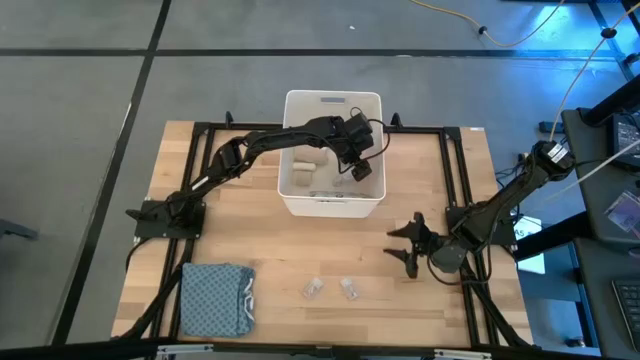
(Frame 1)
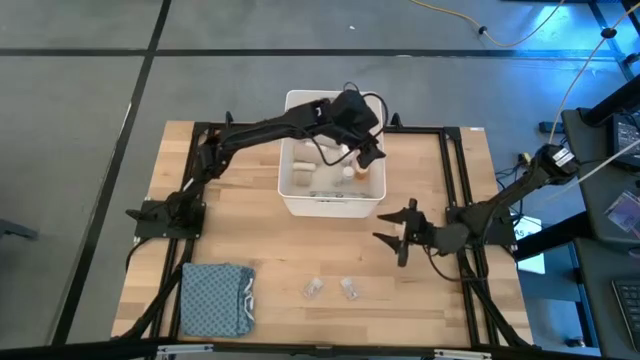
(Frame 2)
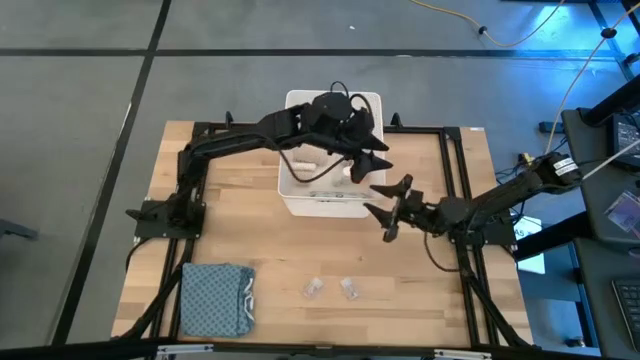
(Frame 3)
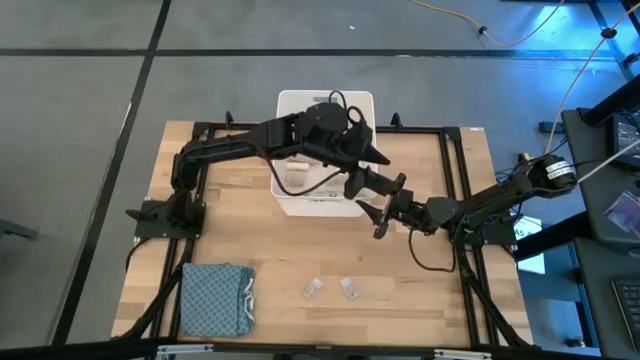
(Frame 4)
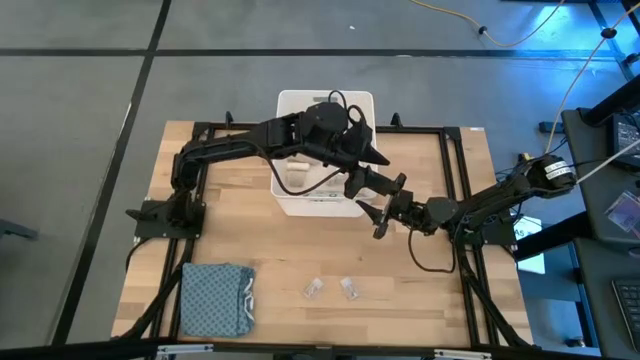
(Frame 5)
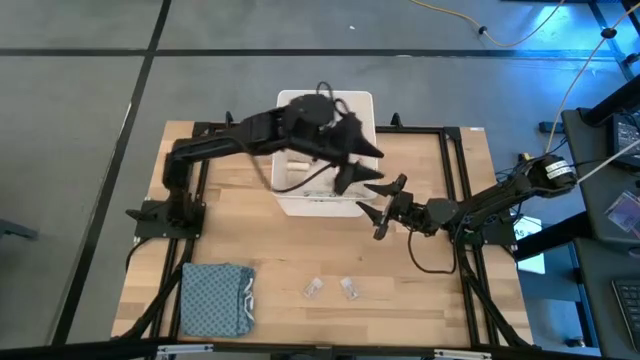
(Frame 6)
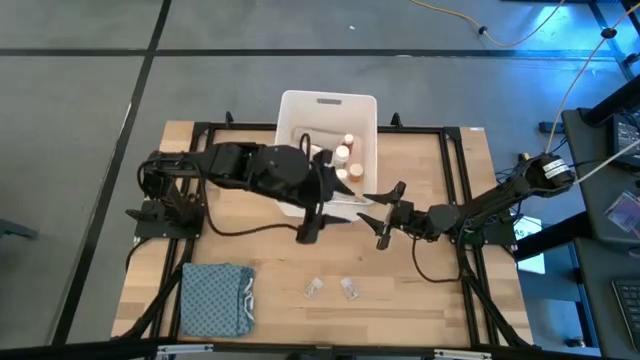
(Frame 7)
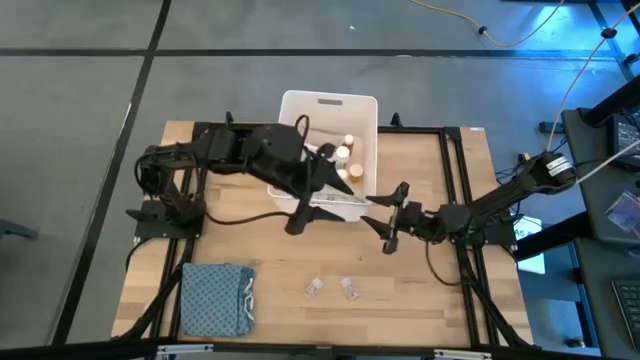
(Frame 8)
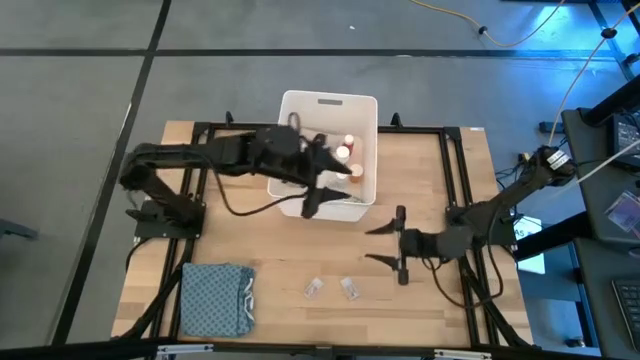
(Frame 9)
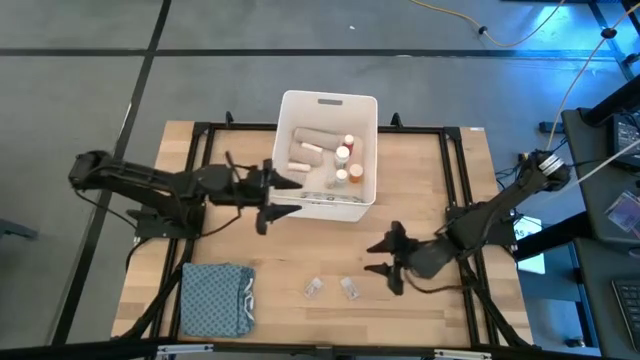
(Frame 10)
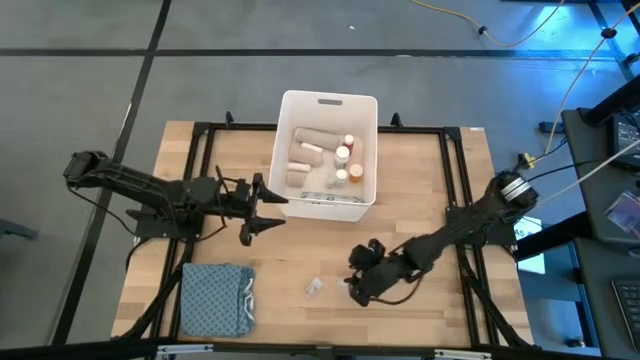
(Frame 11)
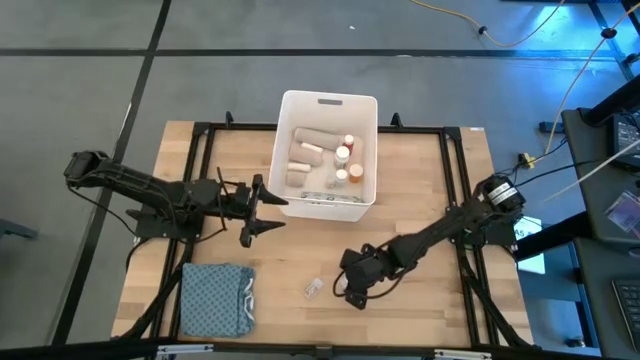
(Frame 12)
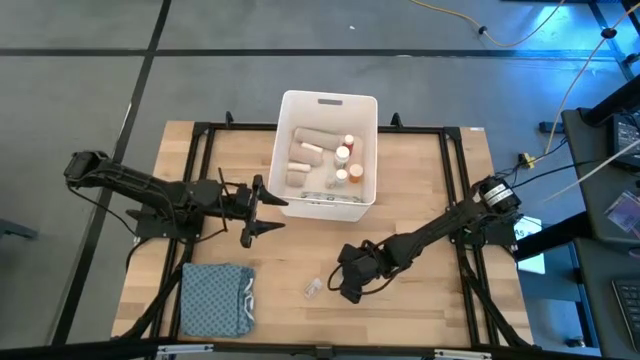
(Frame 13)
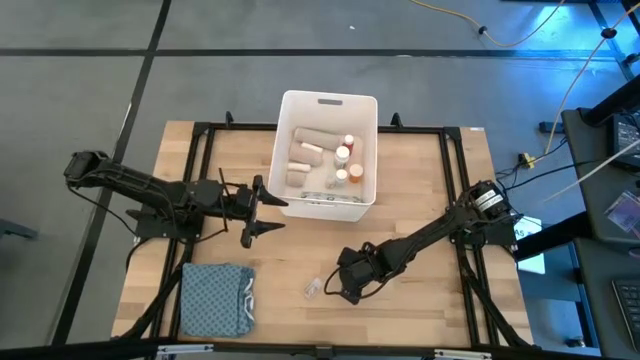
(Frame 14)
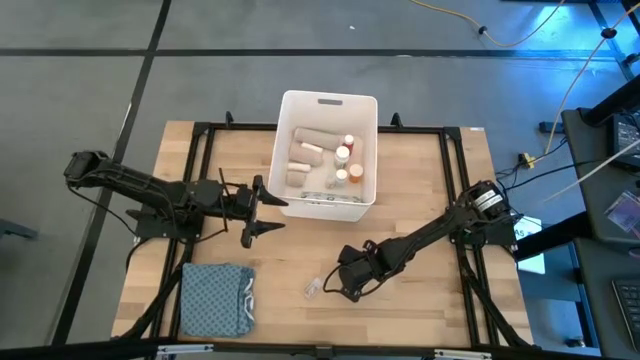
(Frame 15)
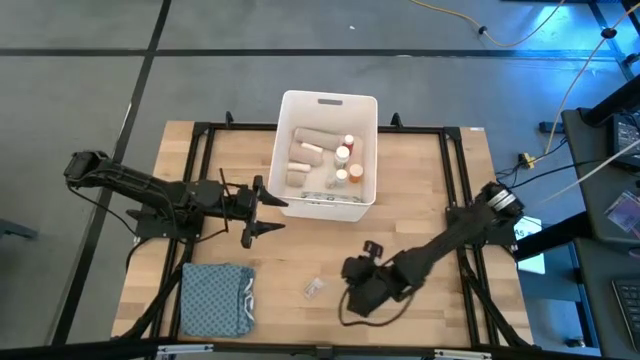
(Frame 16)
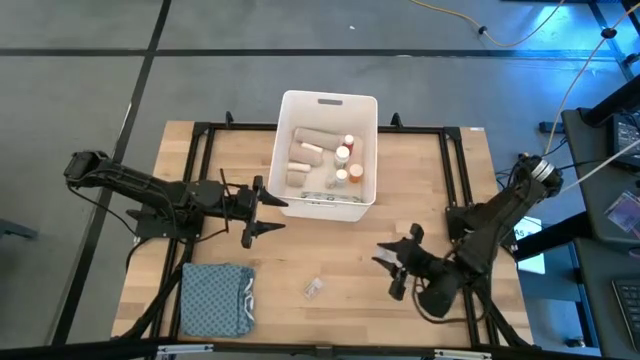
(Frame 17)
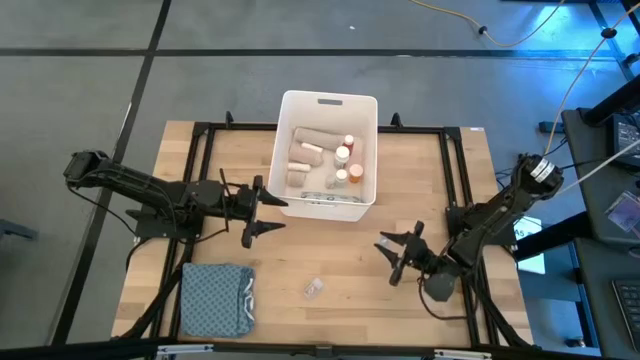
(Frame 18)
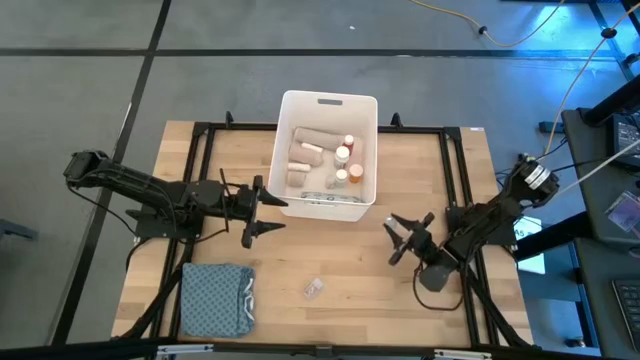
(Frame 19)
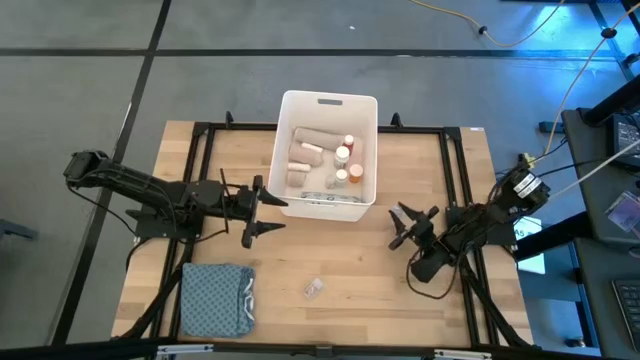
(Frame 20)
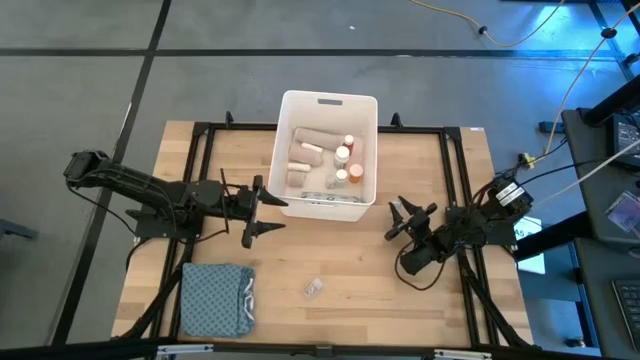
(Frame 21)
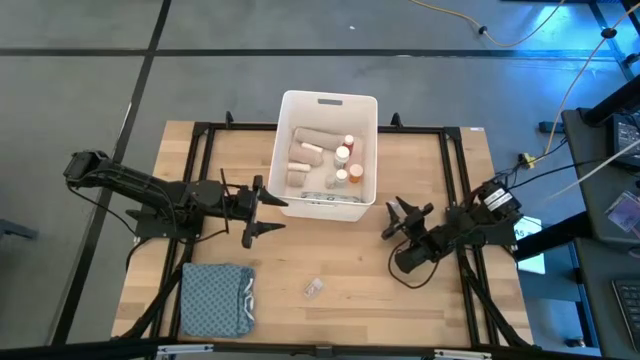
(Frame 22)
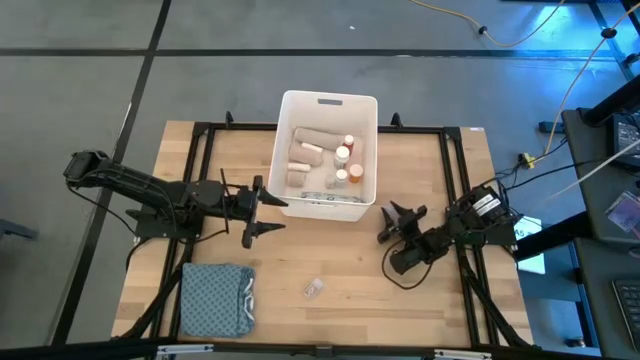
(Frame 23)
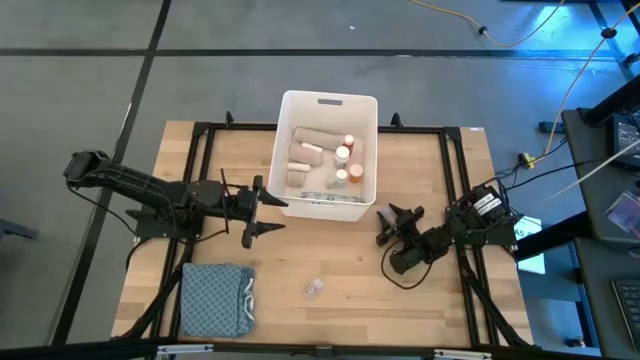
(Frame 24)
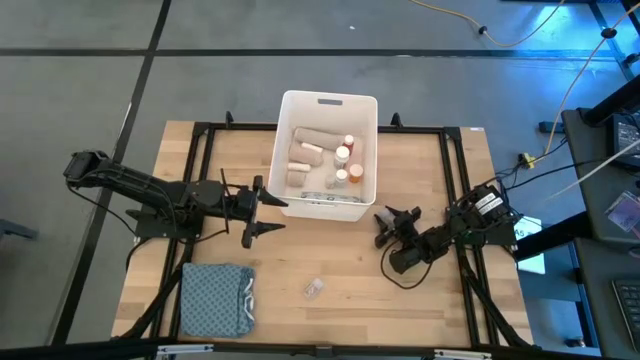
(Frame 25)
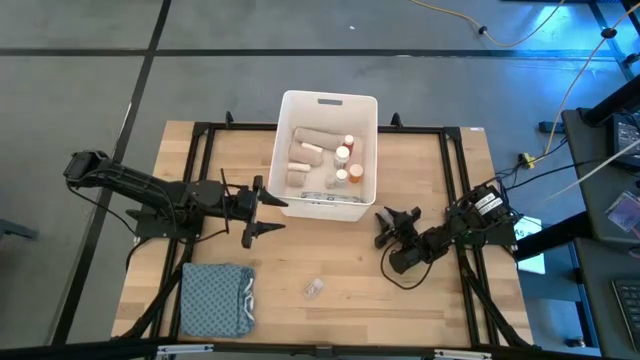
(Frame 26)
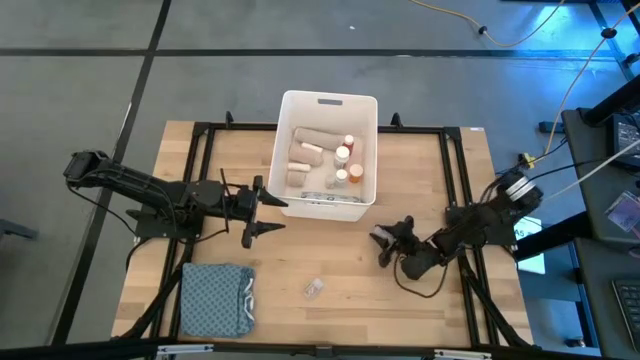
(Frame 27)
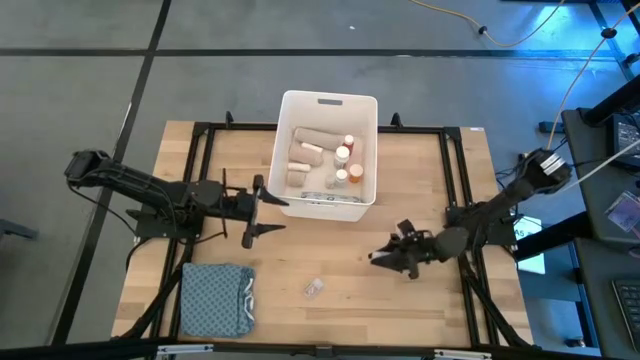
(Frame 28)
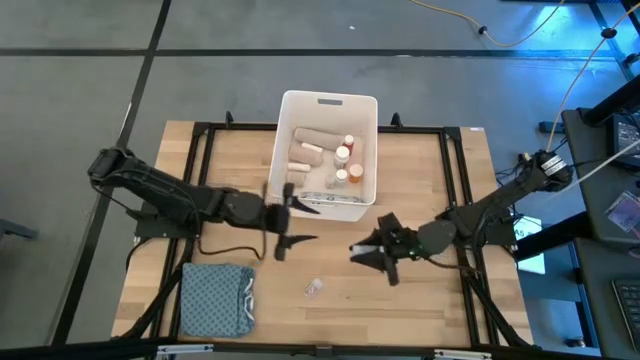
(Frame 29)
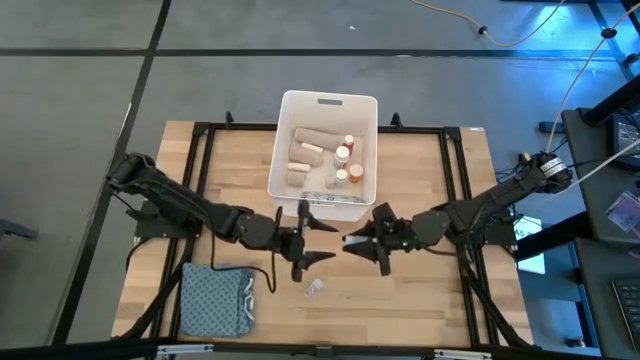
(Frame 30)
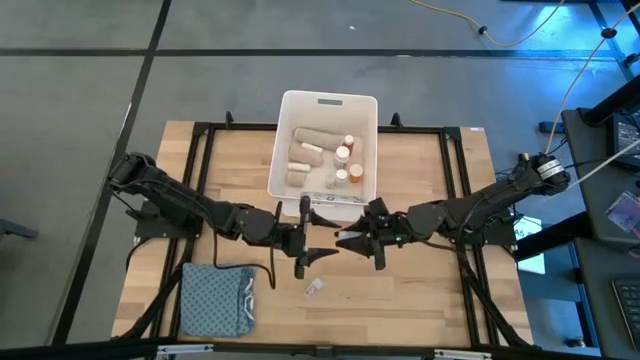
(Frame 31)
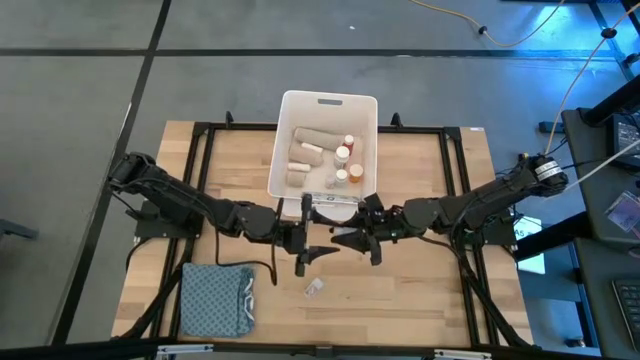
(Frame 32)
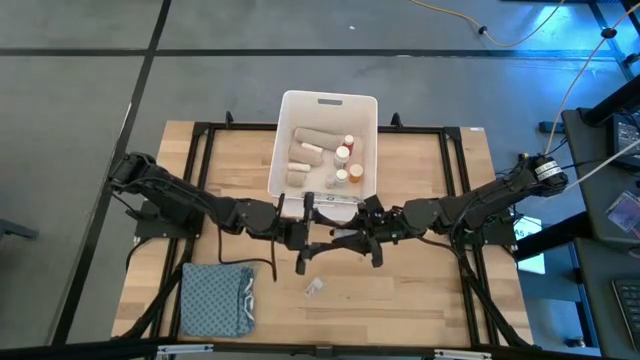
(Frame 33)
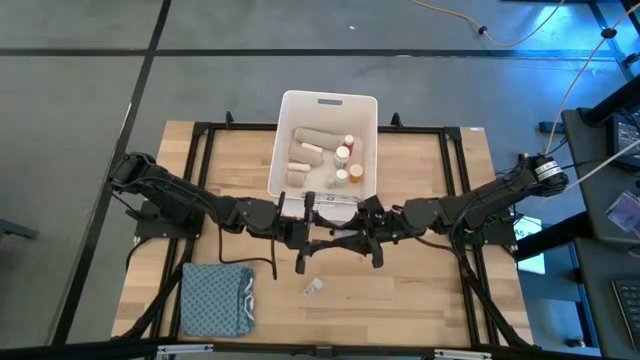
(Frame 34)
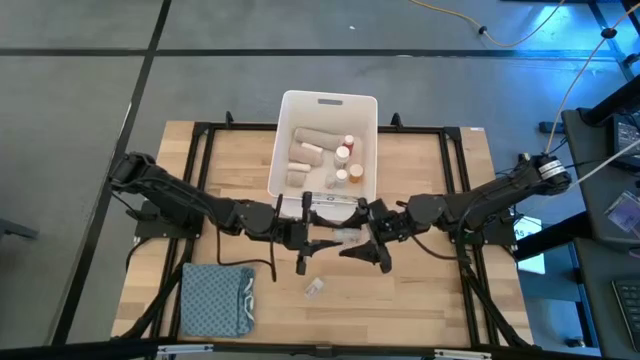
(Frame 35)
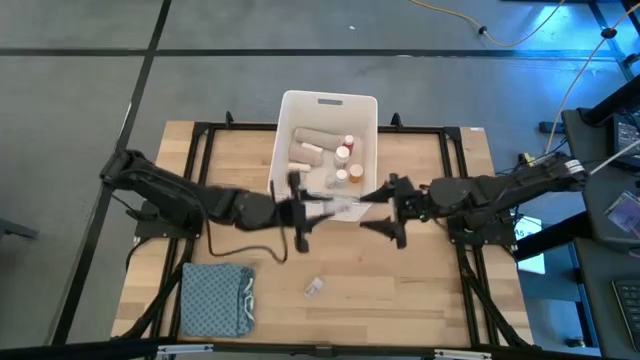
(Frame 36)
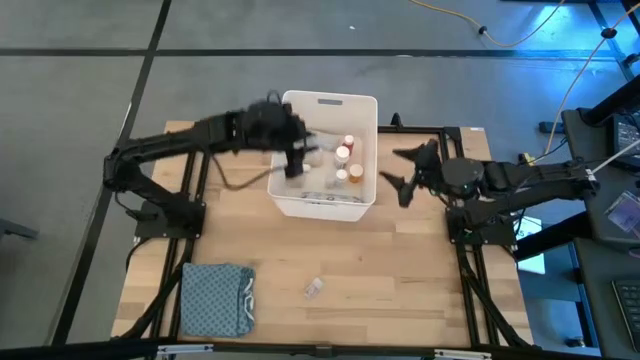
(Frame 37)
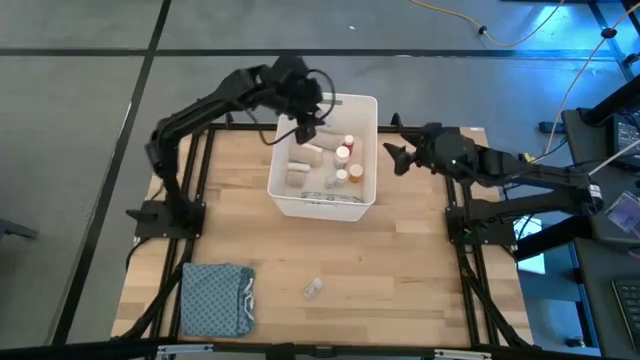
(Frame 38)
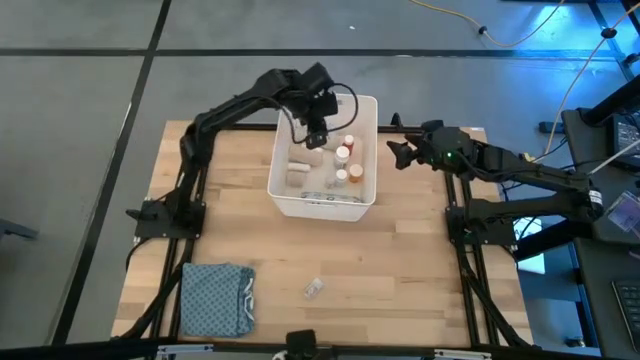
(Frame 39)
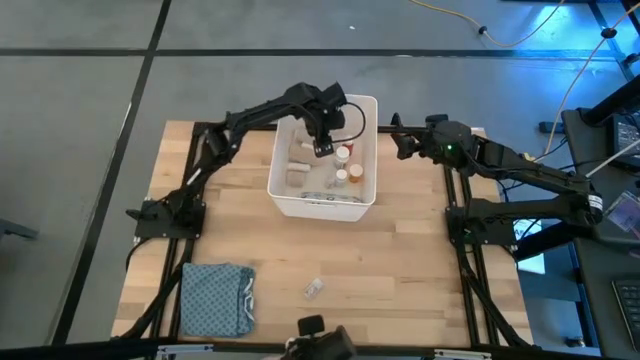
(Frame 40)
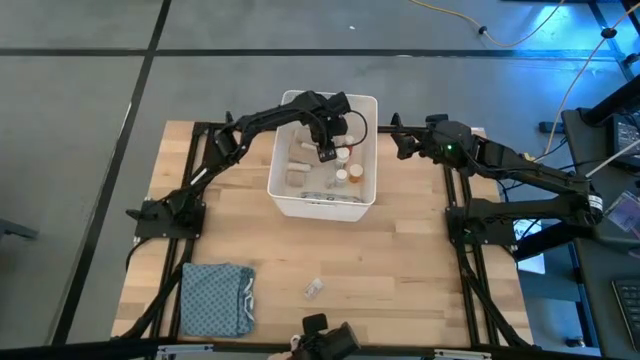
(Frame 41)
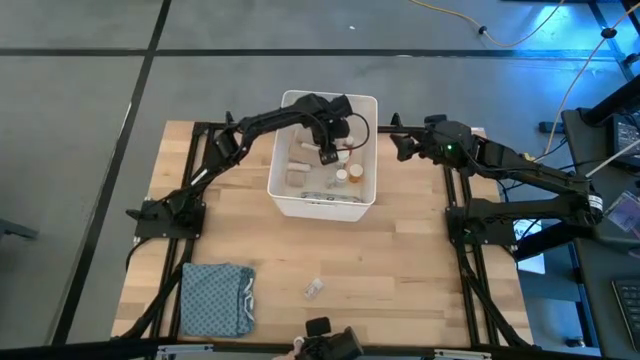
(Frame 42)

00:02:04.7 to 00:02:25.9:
Task: Pick & place medical supplies in basket/bin
Put the right transparent pill bottle into the white bin
